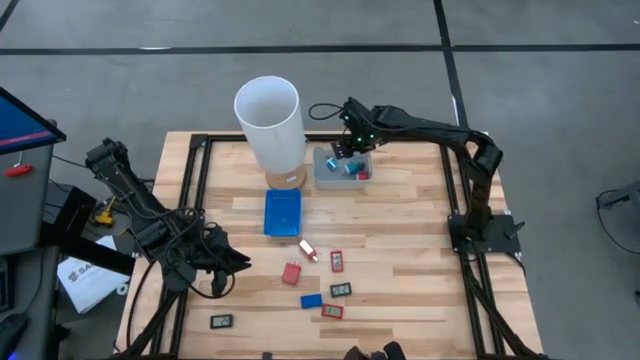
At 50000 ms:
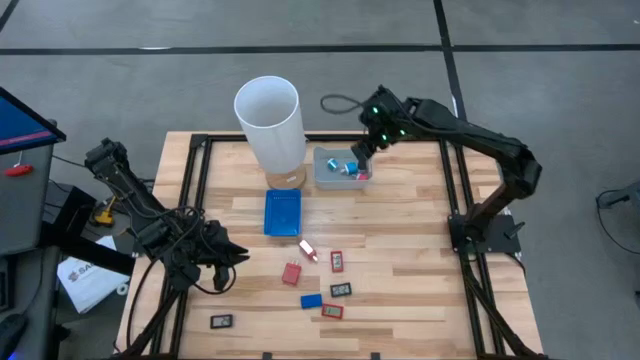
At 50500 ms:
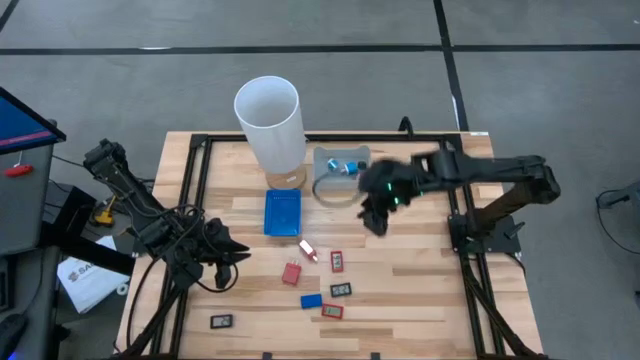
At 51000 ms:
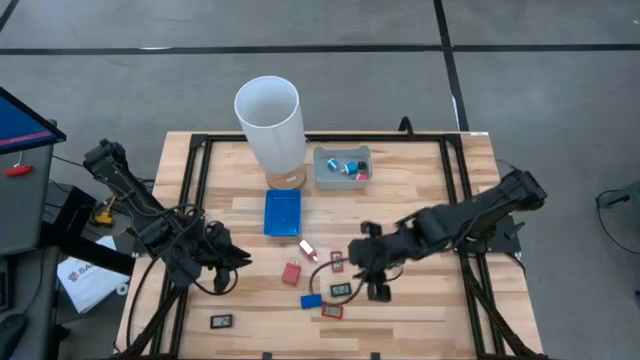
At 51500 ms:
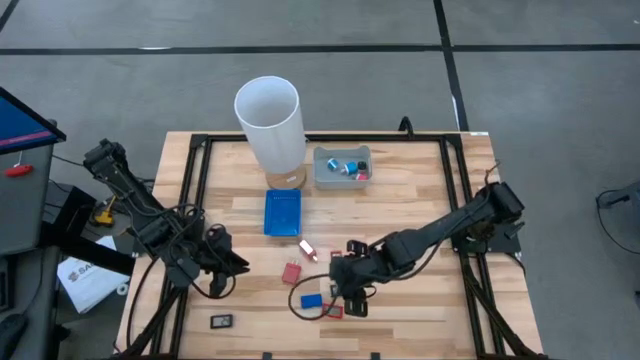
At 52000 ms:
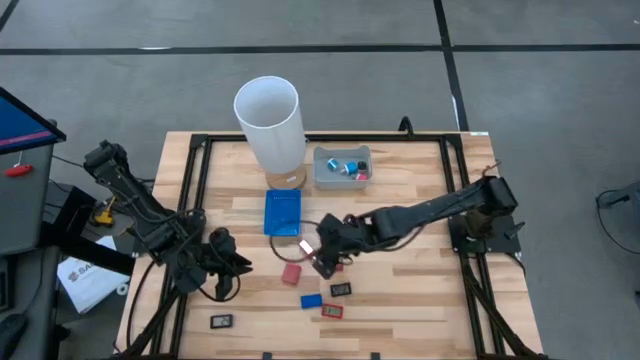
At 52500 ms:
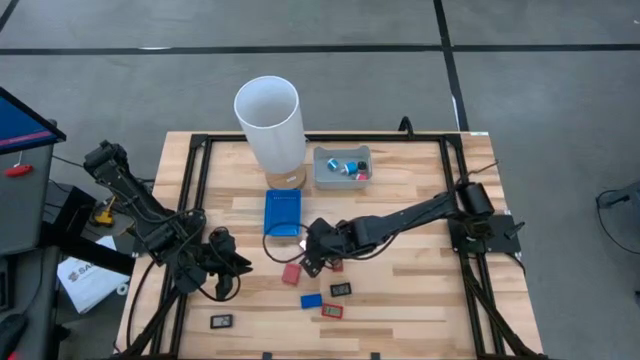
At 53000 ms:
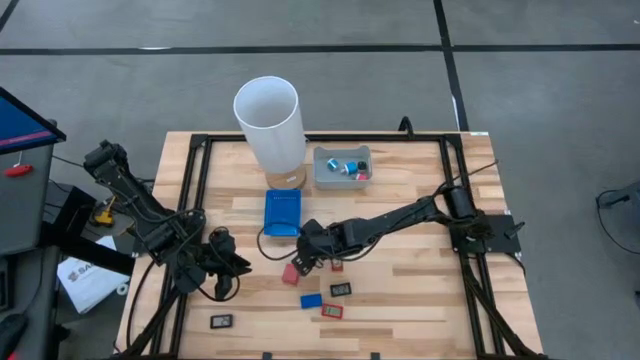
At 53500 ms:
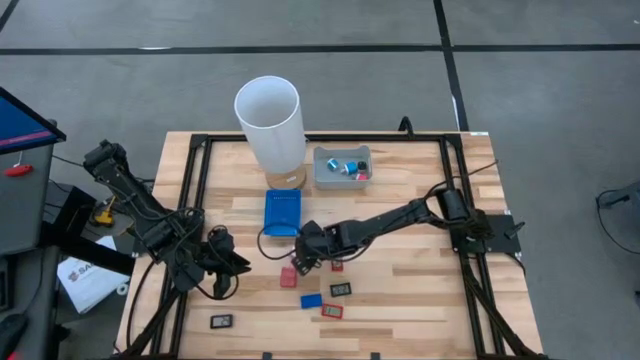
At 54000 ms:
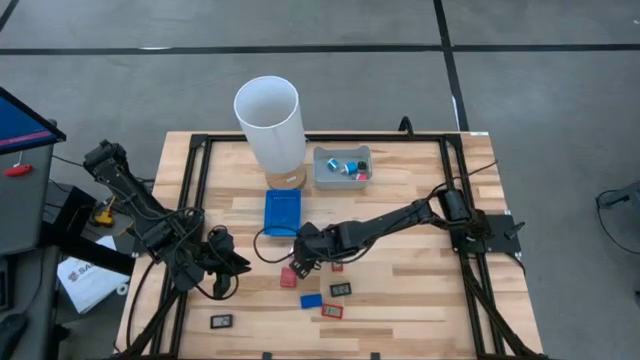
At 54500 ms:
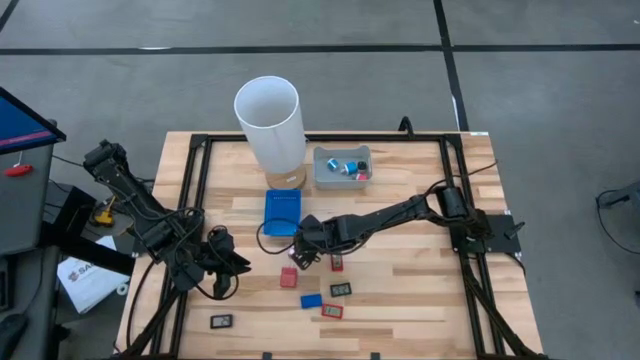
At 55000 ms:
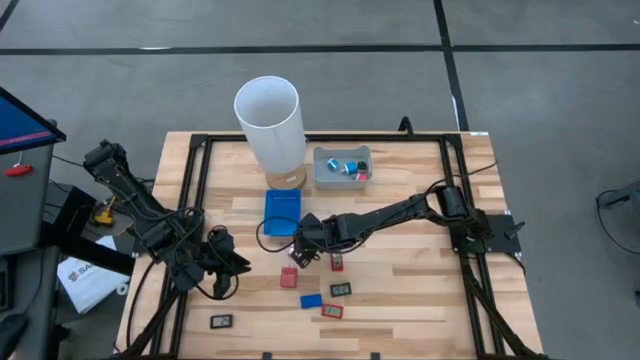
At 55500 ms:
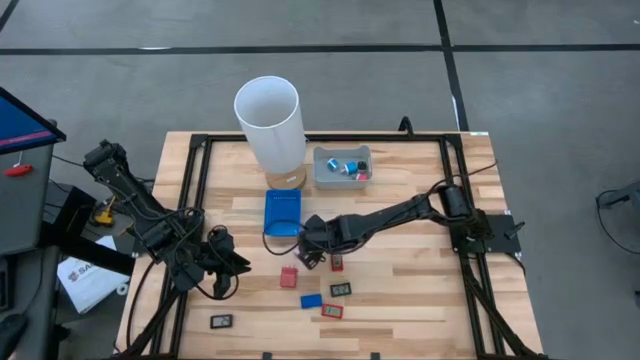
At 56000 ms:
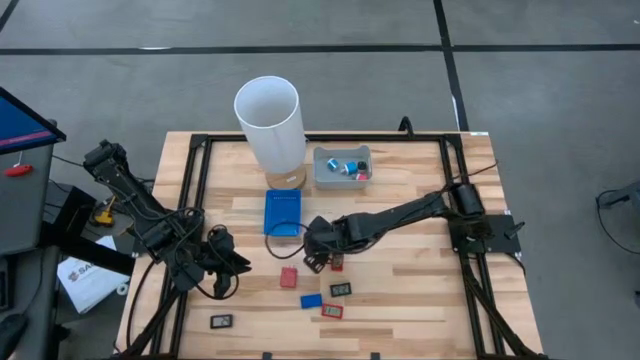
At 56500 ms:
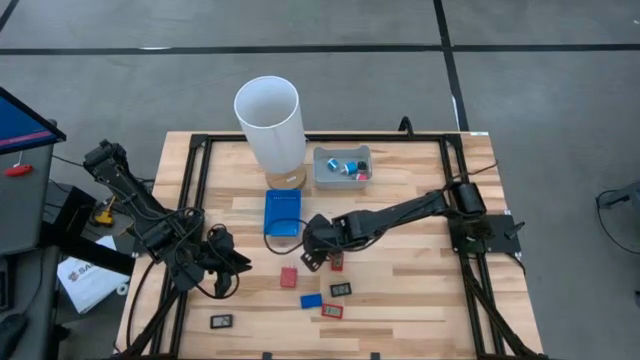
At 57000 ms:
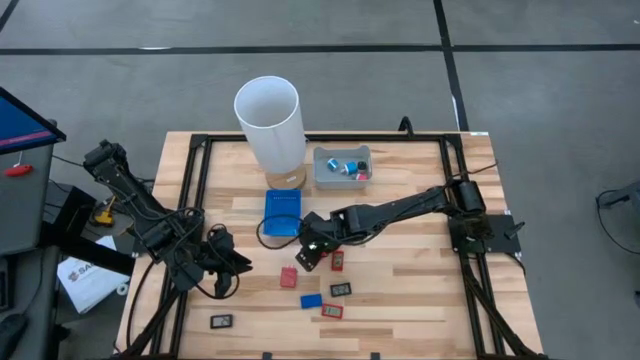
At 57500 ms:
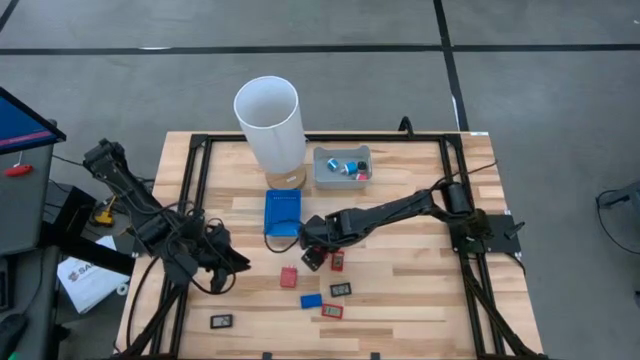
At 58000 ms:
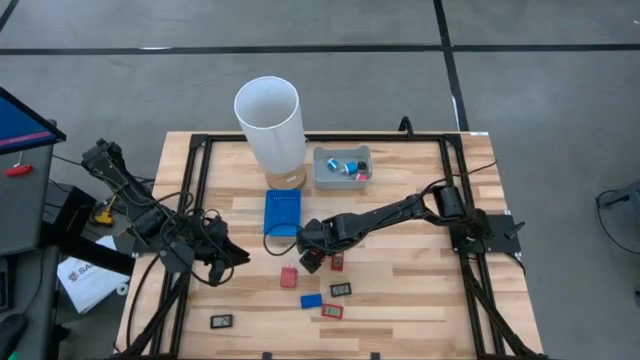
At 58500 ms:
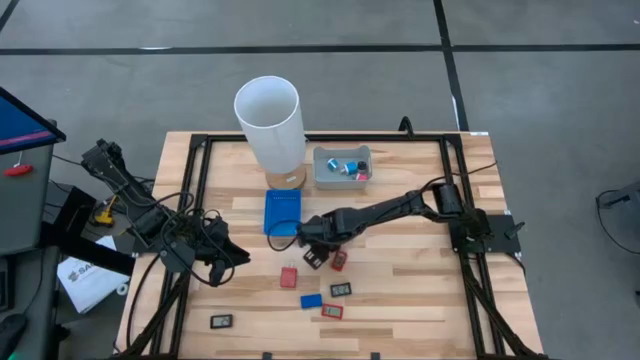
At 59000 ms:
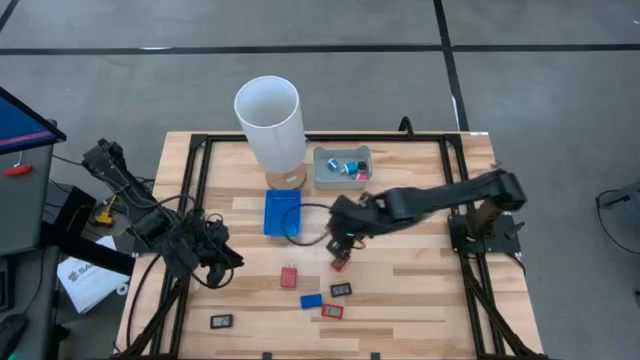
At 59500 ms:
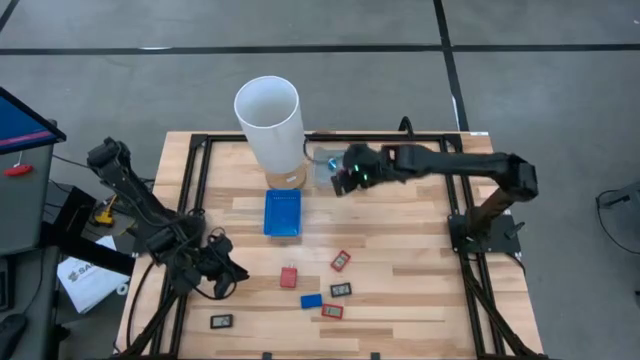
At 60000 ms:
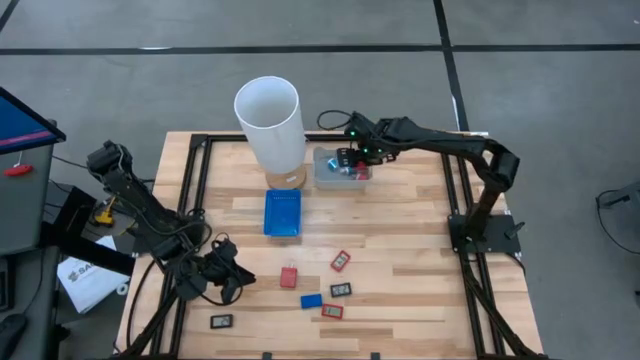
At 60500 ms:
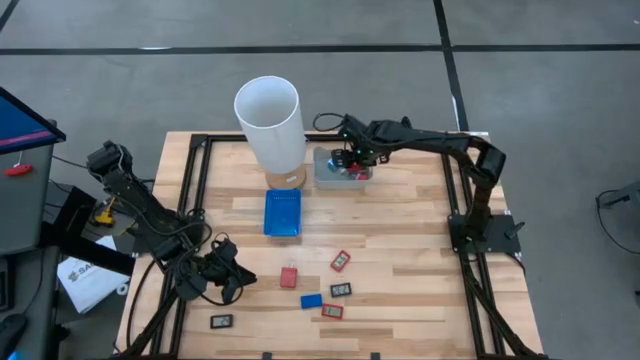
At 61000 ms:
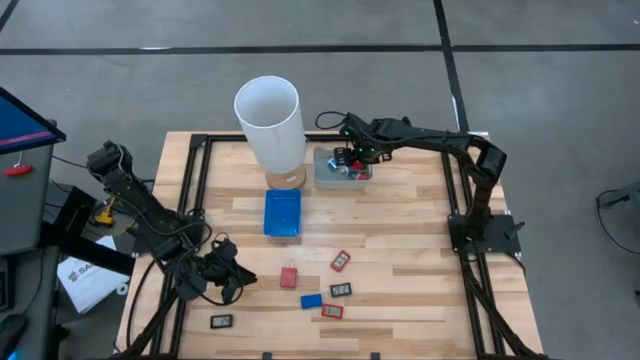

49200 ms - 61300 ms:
Task: Pick & Place Office items
Put the top red charger adapter into the gray bin

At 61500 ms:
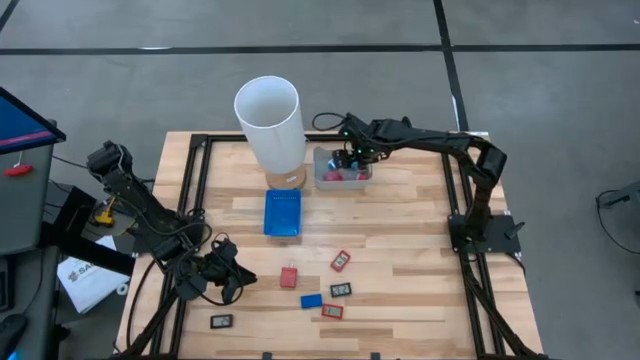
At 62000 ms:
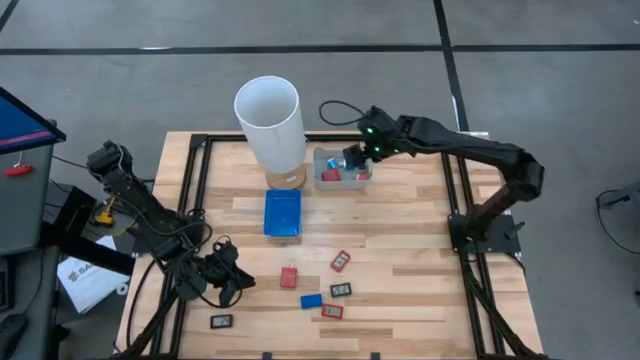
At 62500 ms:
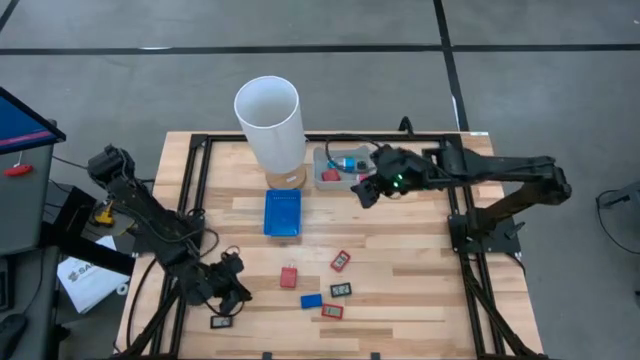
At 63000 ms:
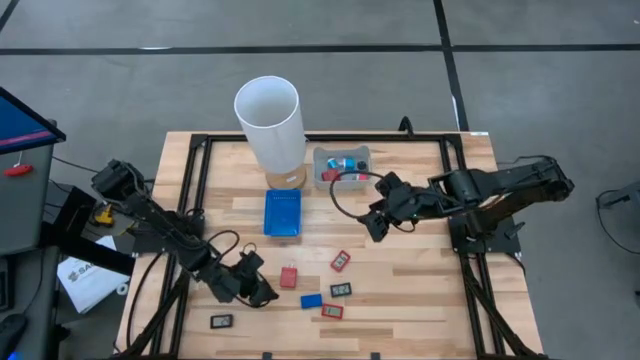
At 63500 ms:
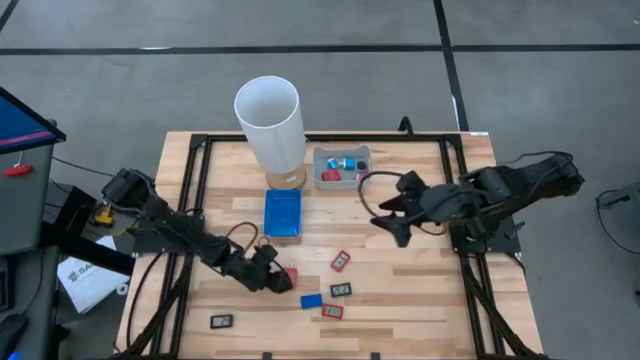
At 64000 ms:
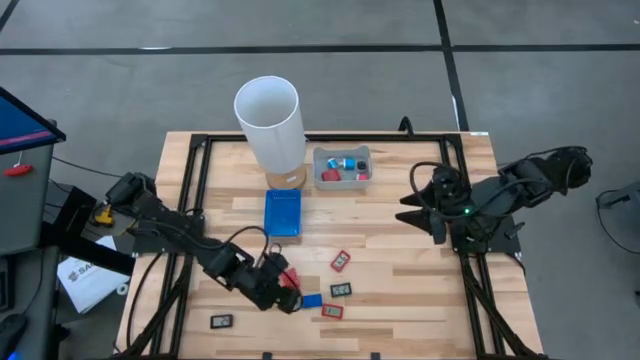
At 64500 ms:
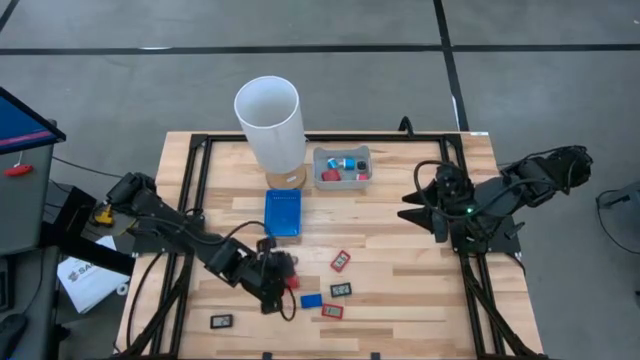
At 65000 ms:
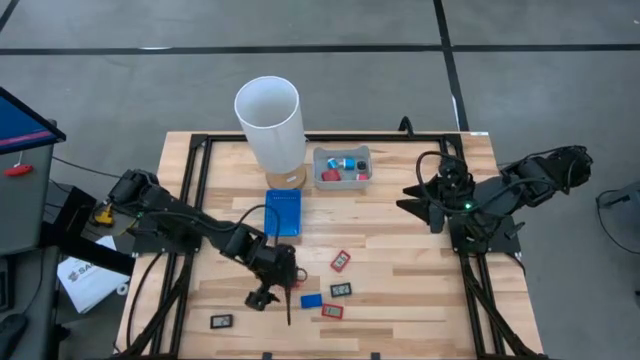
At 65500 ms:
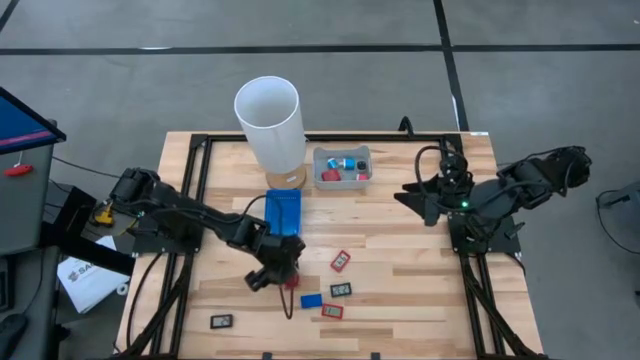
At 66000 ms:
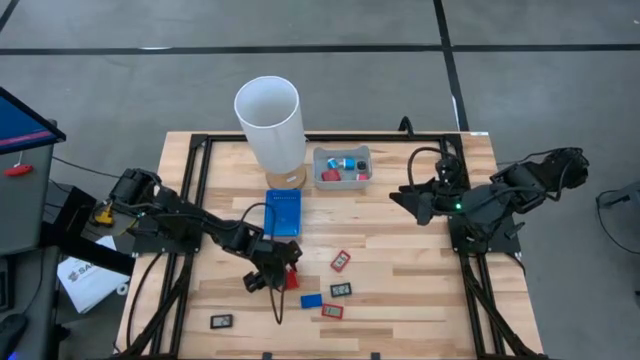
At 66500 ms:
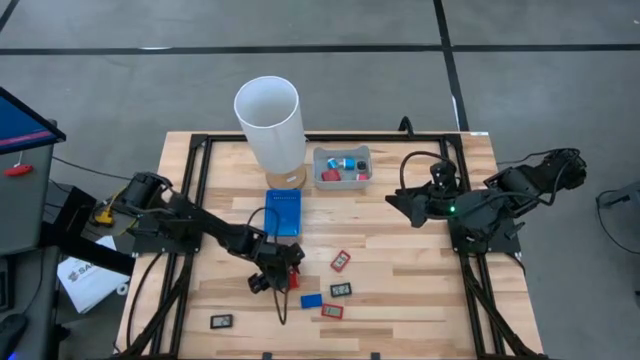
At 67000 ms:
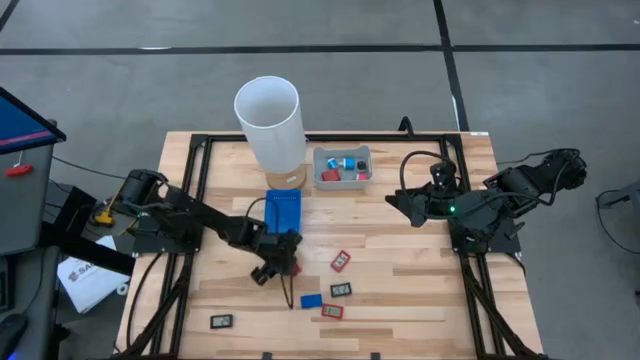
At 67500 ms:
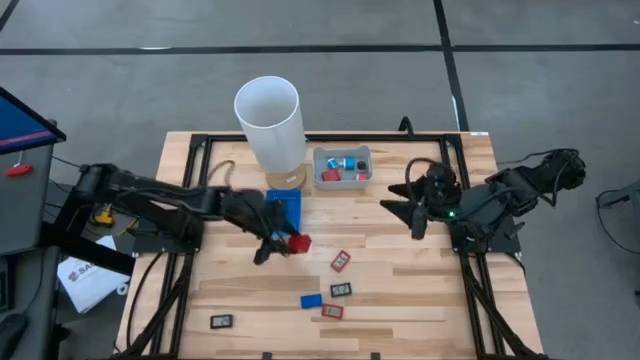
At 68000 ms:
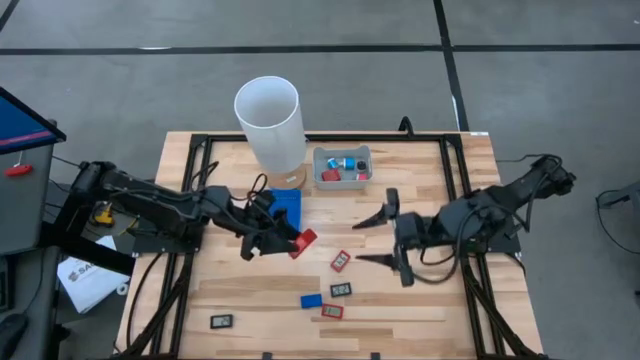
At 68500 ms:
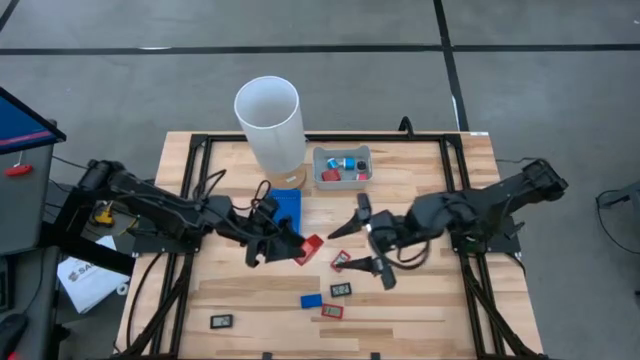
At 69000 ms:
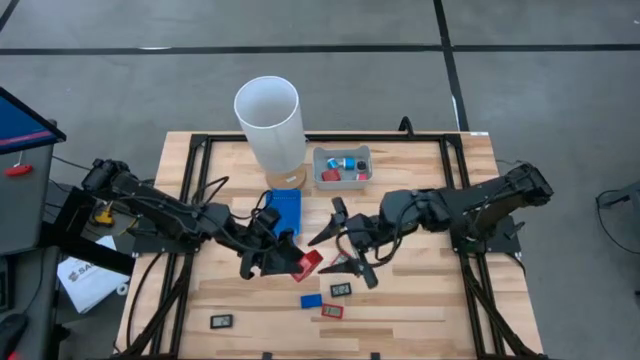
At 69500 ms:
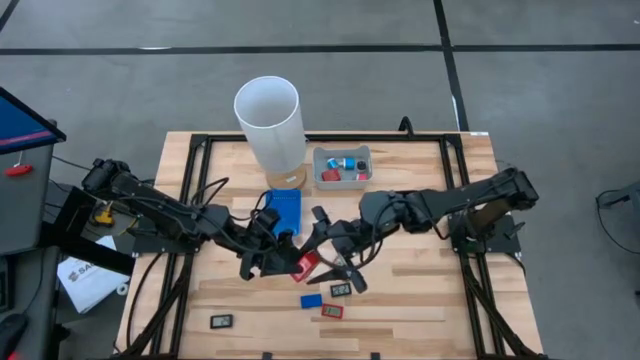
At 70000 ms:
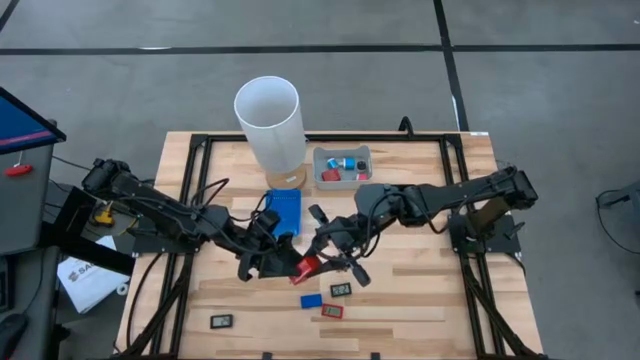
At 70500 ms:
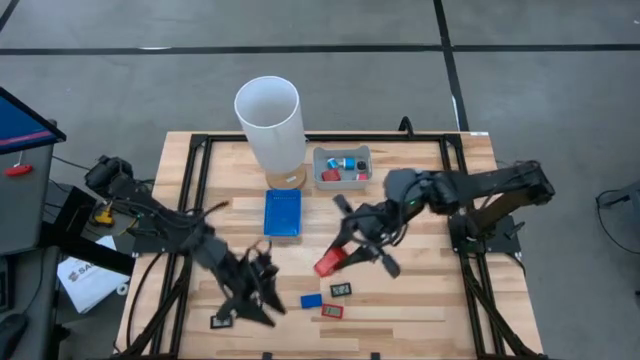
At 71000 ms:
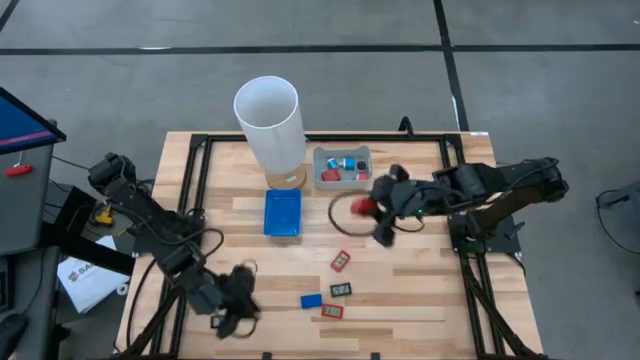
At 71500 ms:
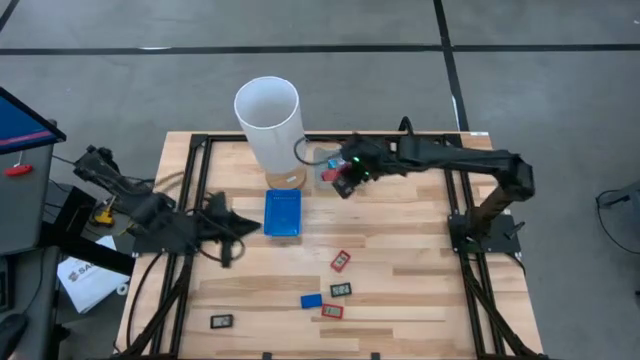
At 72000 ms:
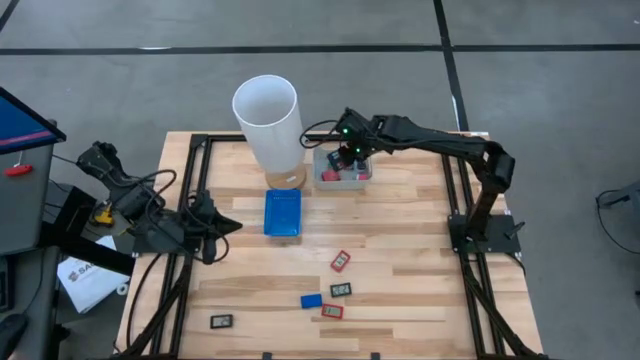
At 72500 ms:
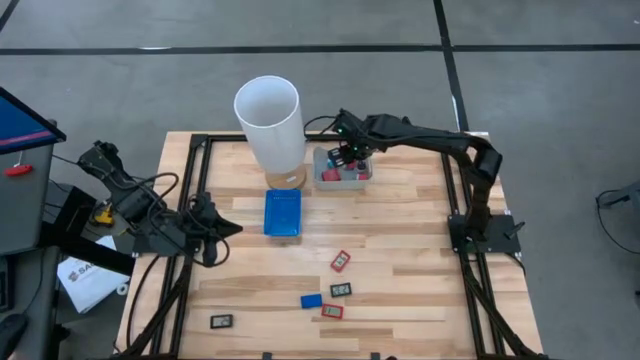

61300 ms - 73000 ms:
Put the red charger adapter into the gray bin
